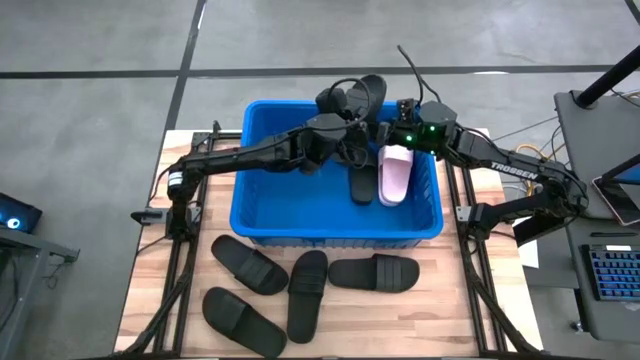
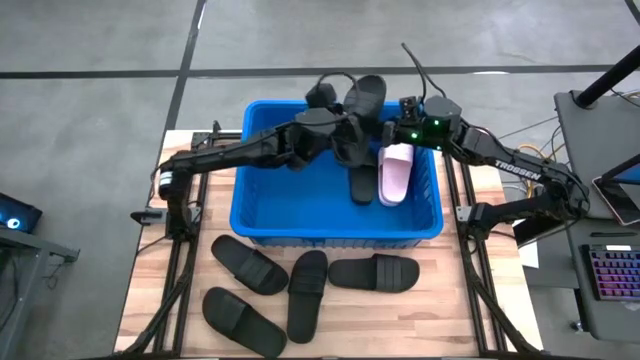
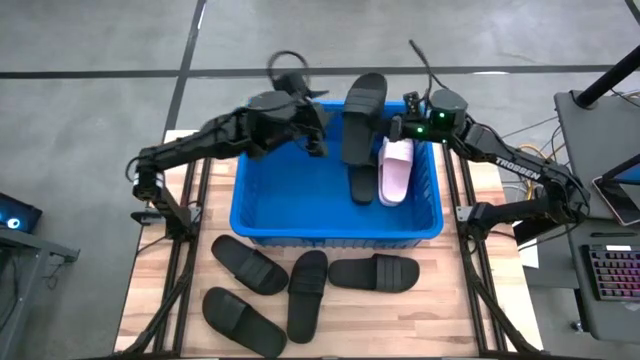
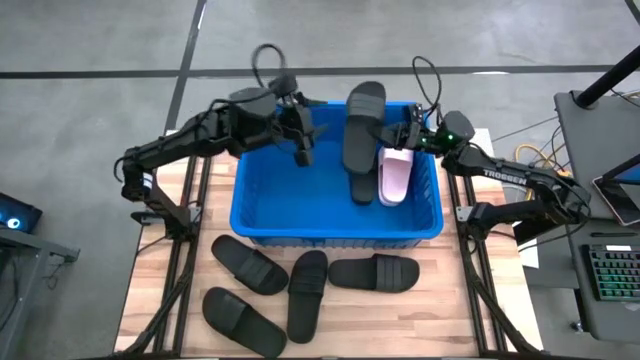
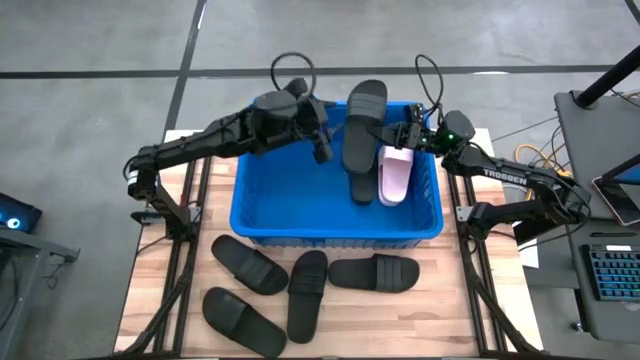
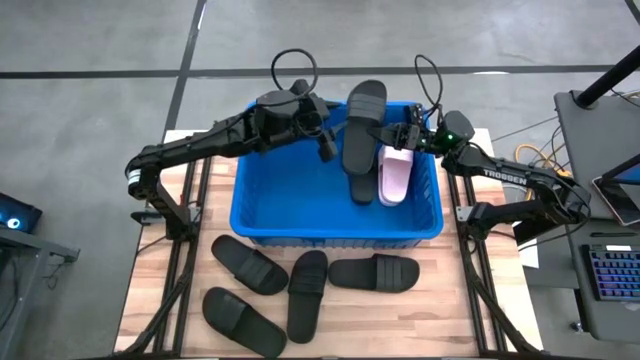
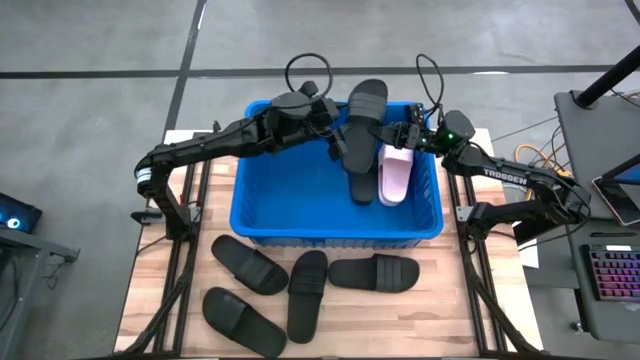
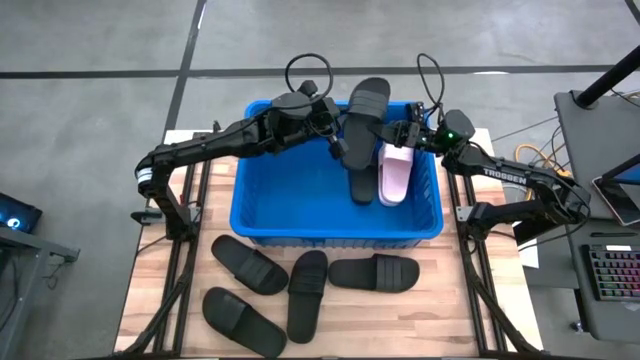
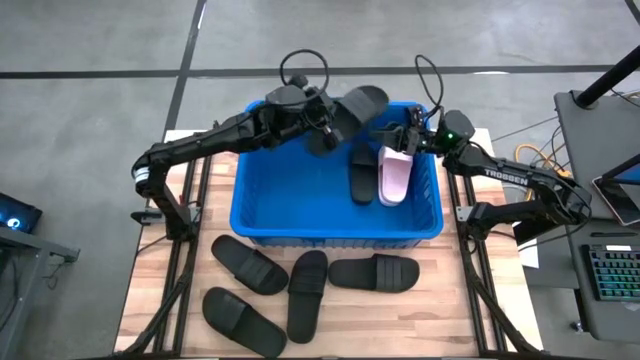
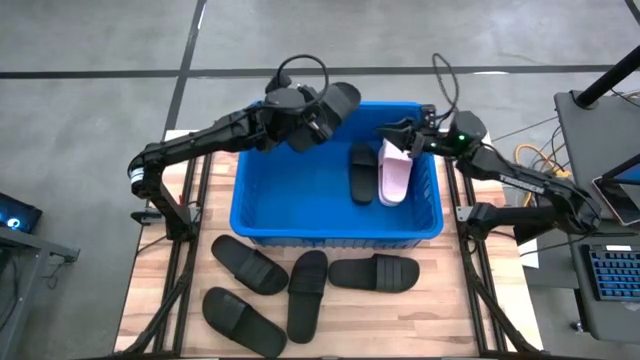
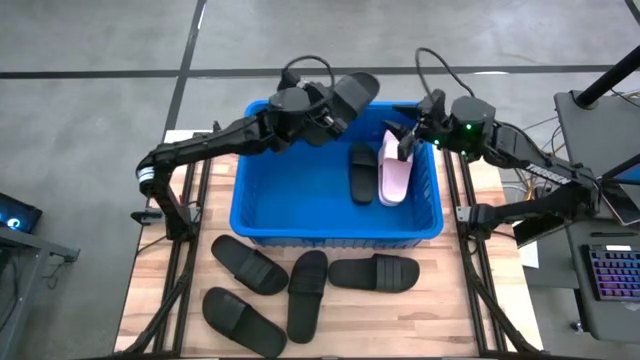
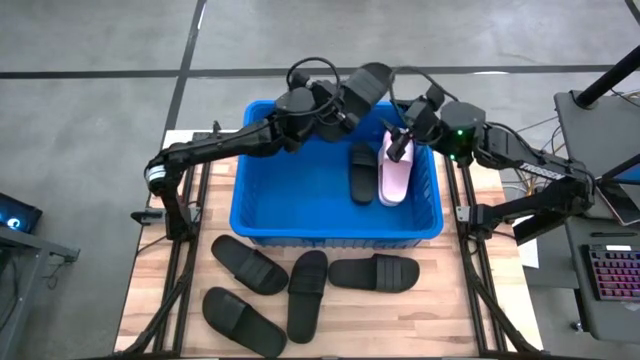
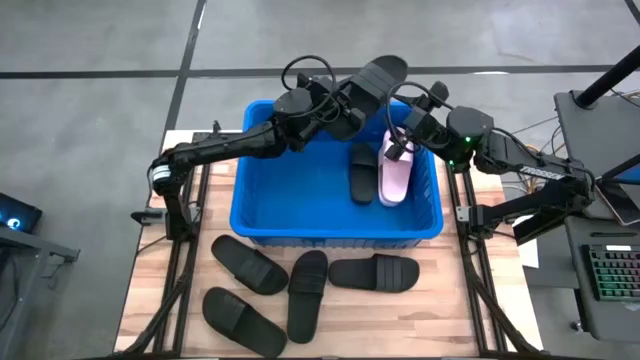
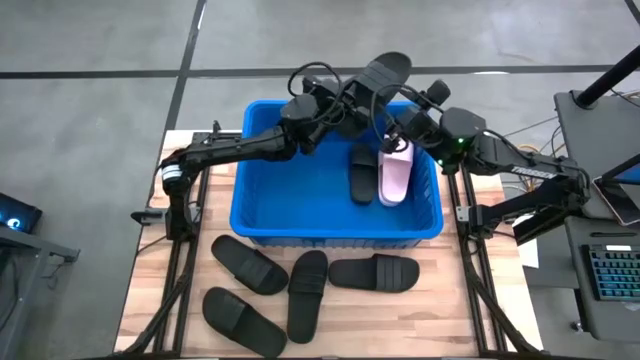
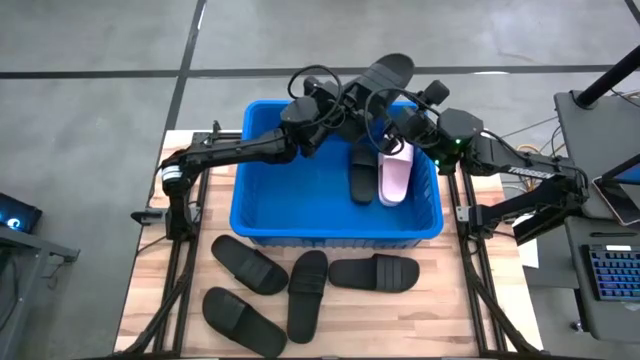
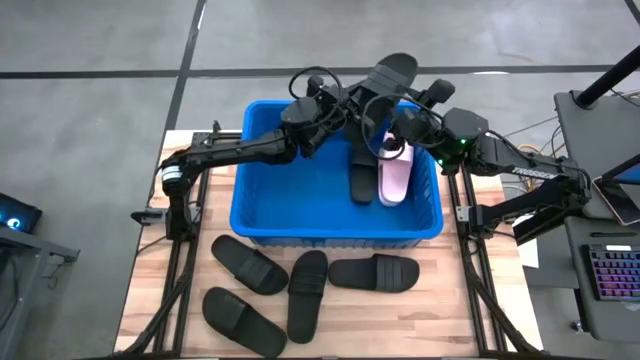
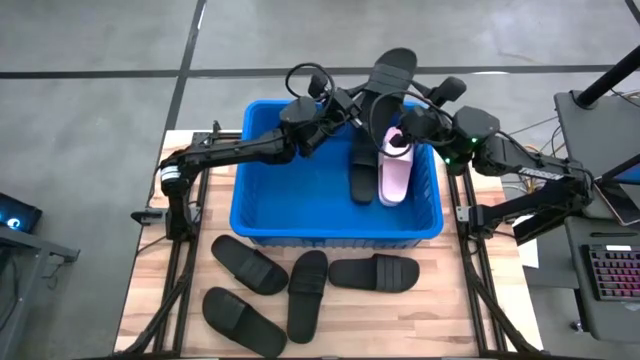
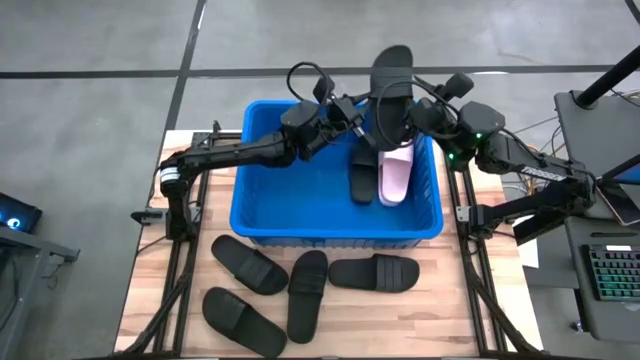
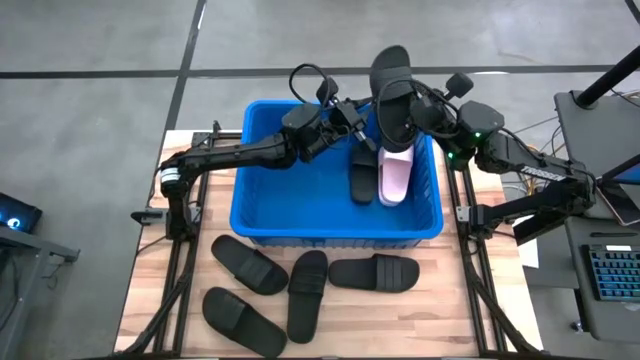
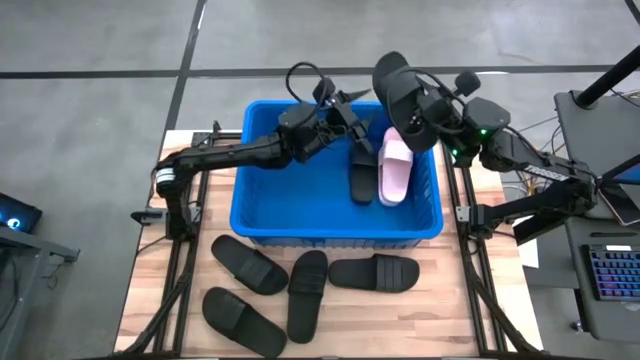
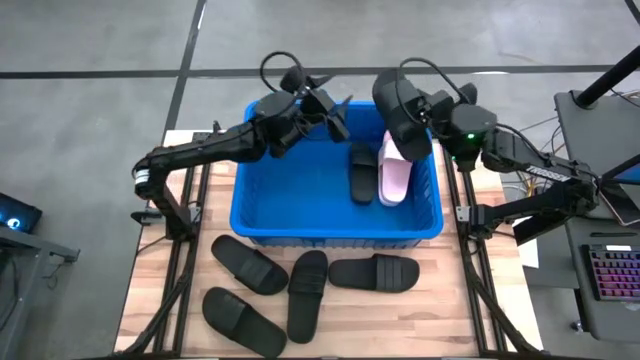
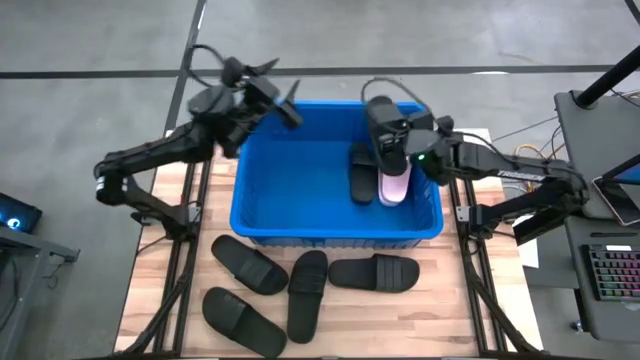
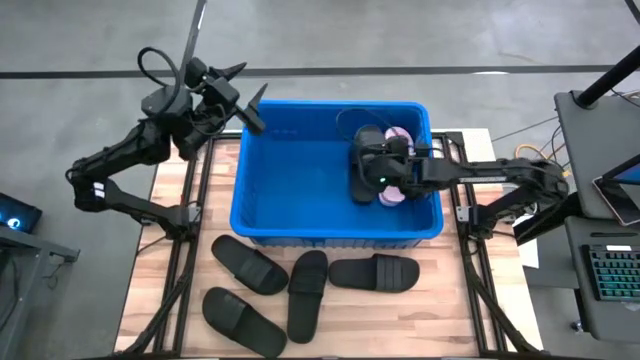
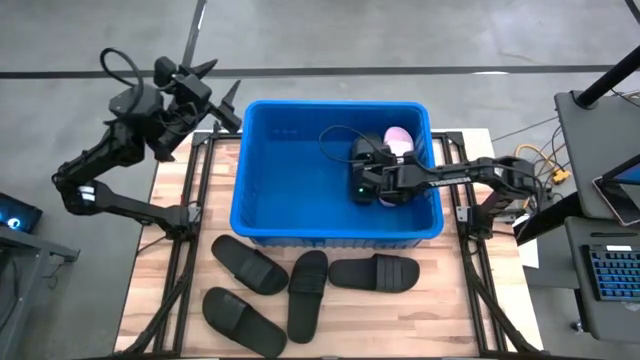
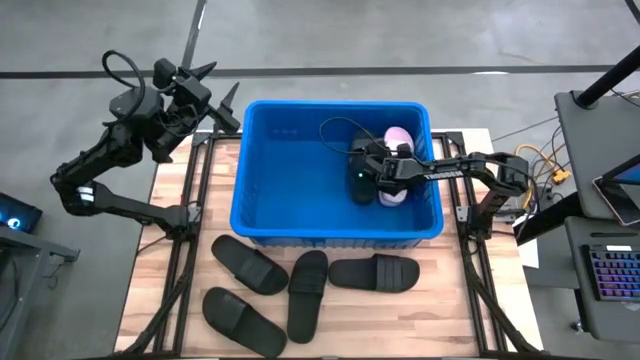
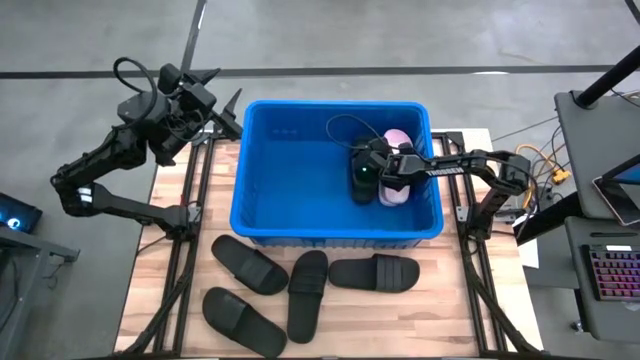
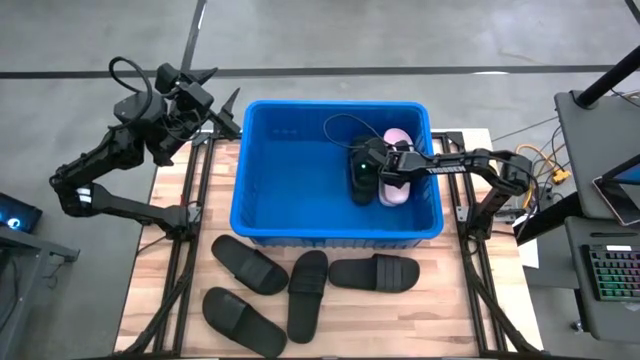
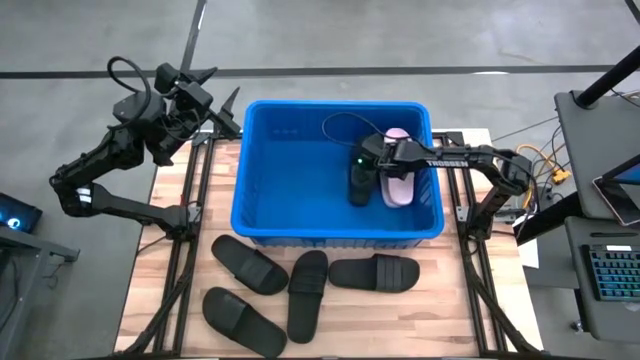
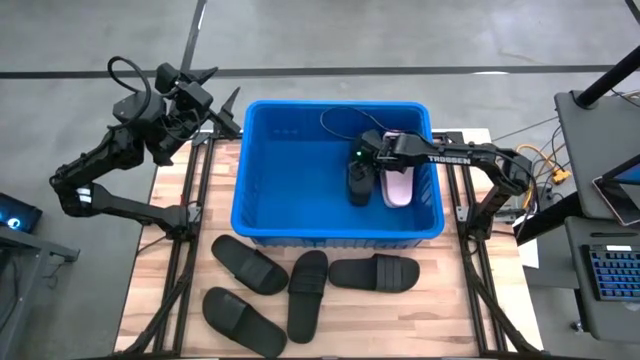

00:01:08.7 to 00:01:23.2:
Task: Pick and place slides into bin
Put the black slide into the blue bin

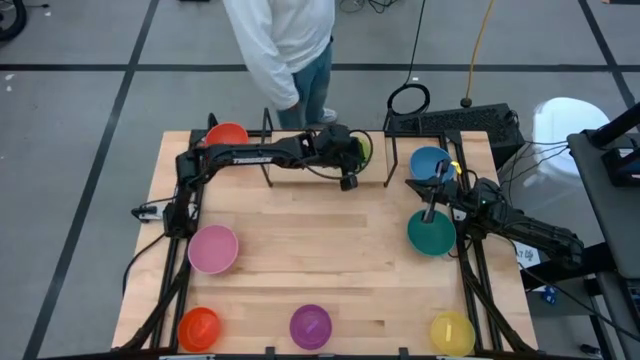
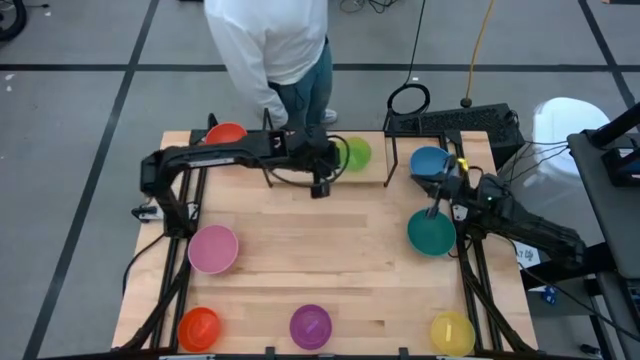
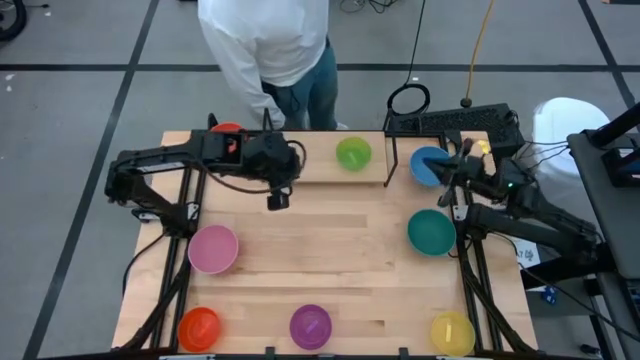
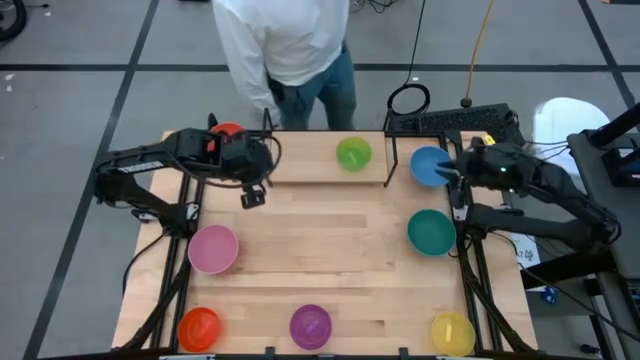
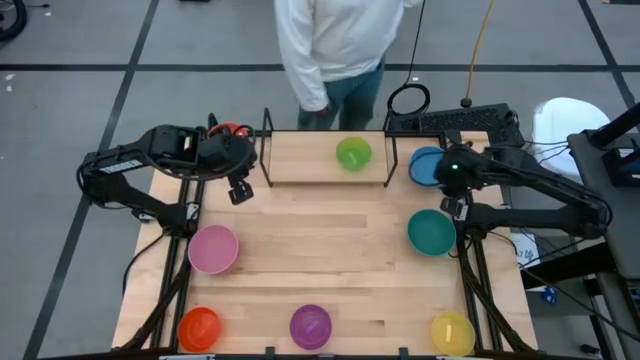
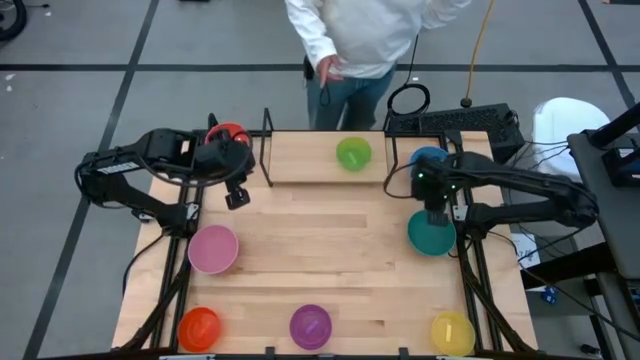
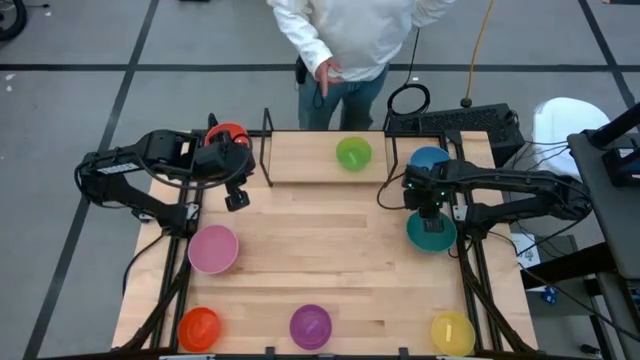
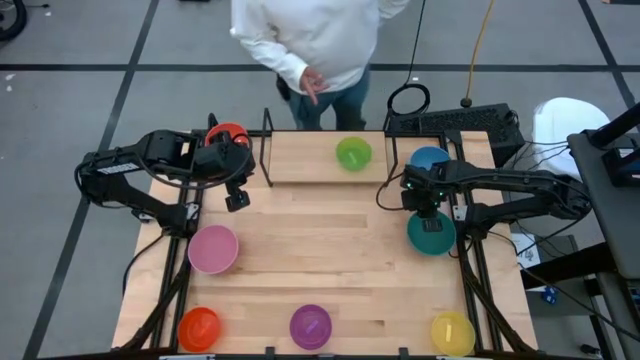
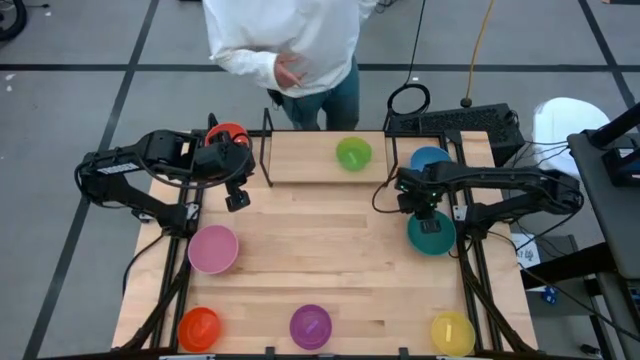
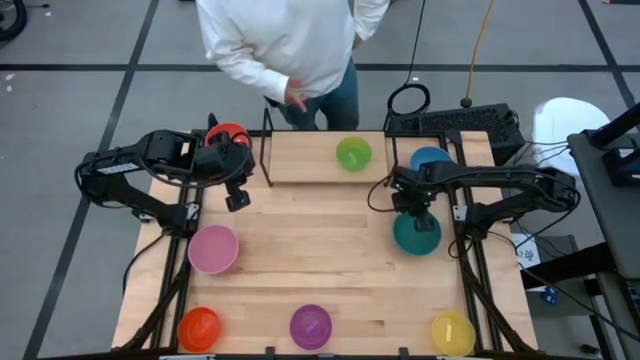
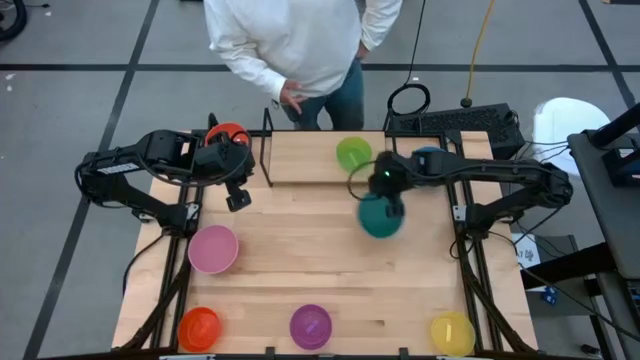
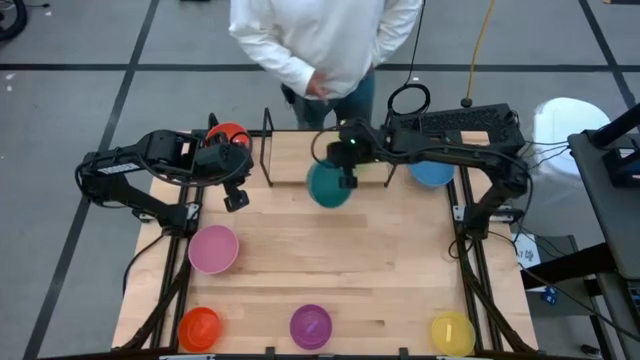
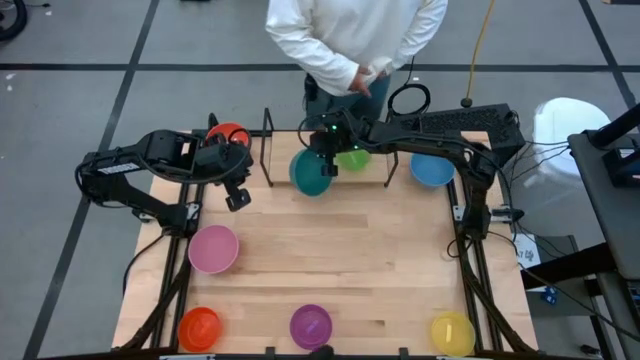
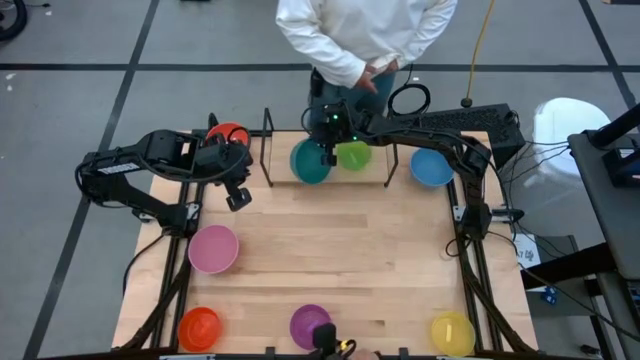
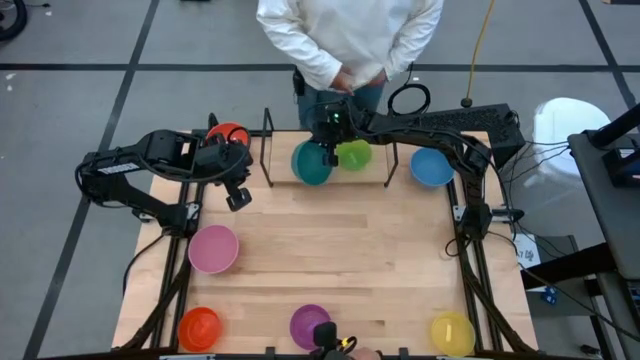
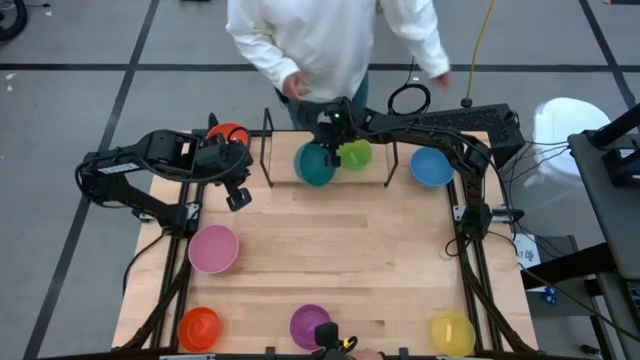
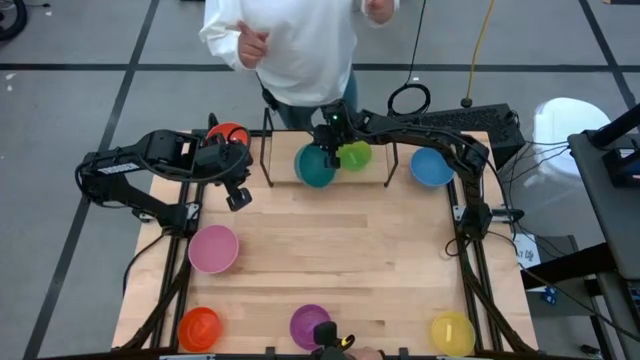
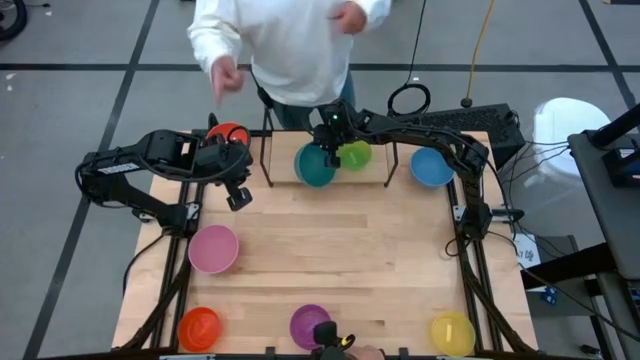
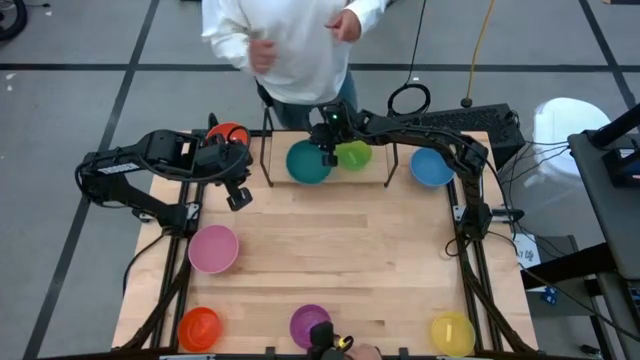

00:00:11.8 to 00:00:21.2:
Task: Place and stack bowls onto a shelf
Put the dark green bowl on the shelf
